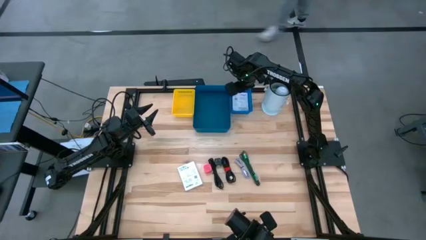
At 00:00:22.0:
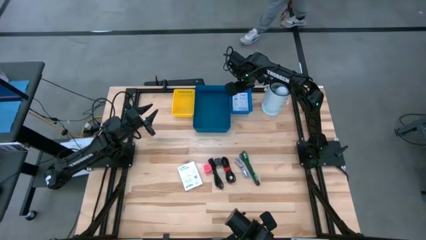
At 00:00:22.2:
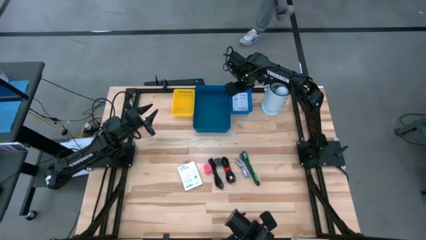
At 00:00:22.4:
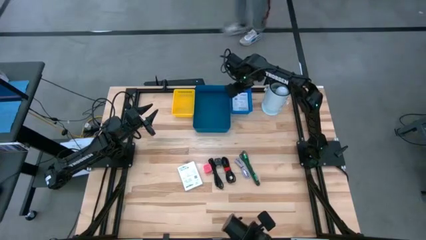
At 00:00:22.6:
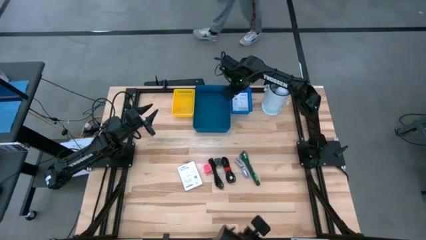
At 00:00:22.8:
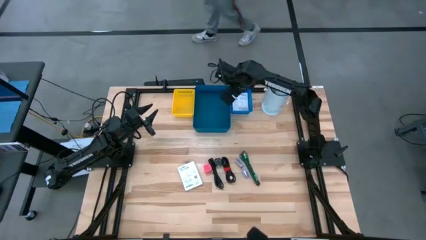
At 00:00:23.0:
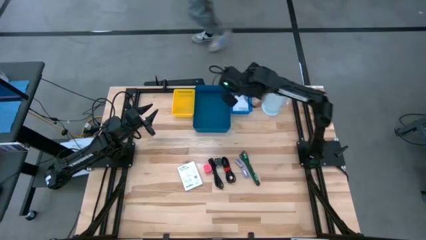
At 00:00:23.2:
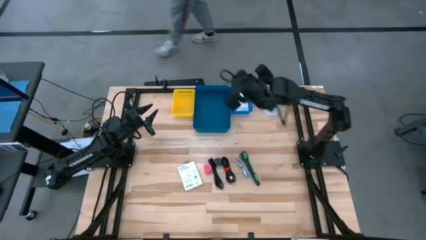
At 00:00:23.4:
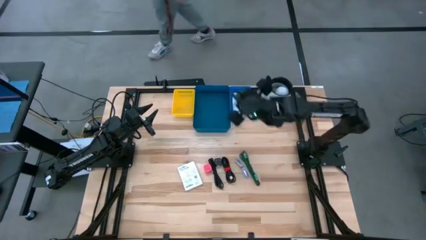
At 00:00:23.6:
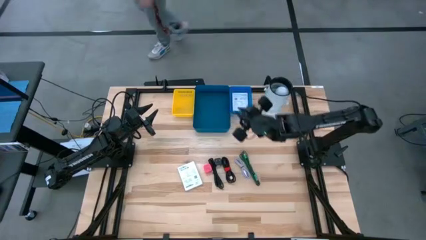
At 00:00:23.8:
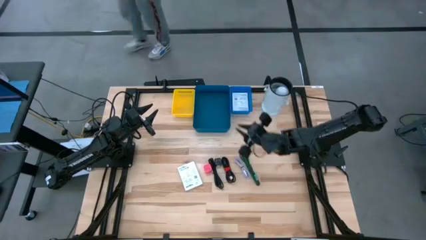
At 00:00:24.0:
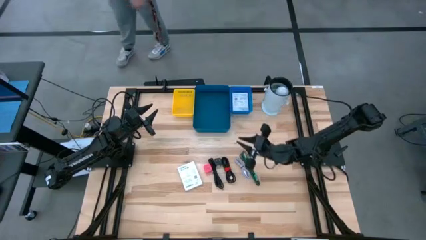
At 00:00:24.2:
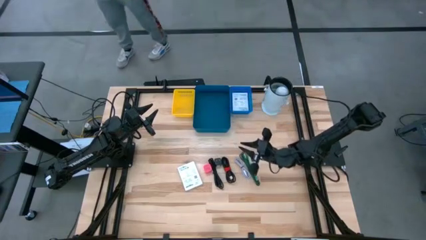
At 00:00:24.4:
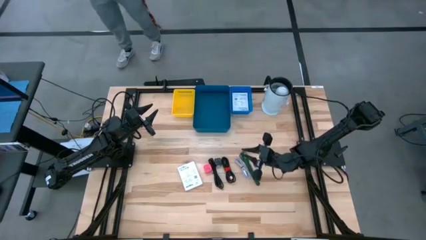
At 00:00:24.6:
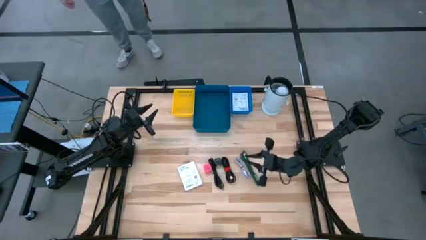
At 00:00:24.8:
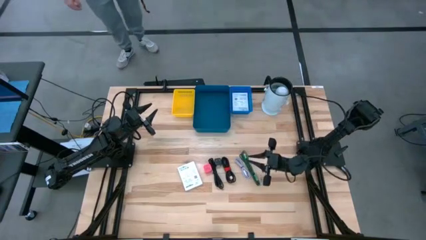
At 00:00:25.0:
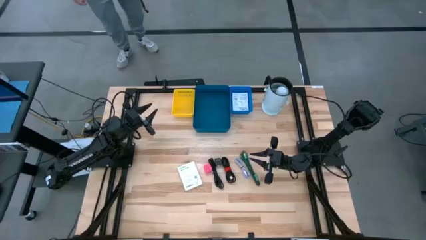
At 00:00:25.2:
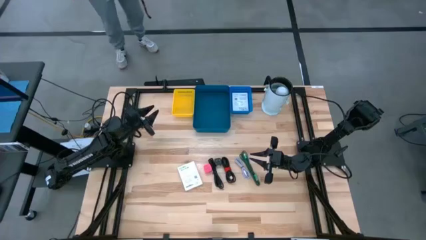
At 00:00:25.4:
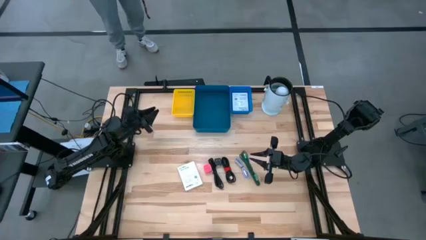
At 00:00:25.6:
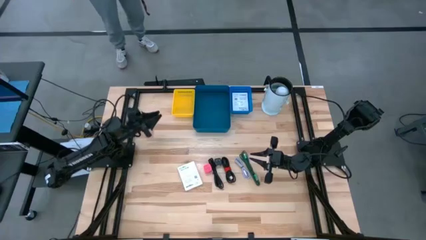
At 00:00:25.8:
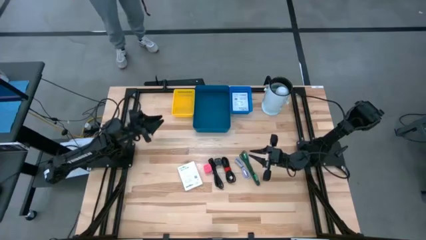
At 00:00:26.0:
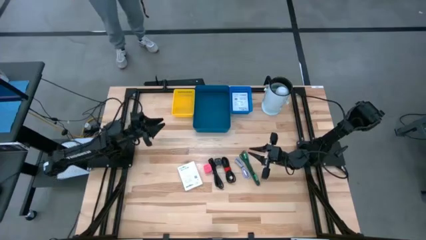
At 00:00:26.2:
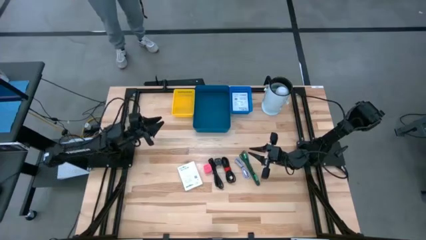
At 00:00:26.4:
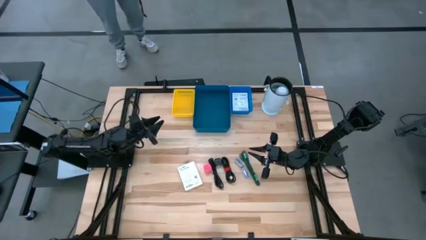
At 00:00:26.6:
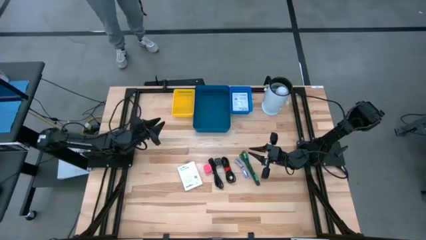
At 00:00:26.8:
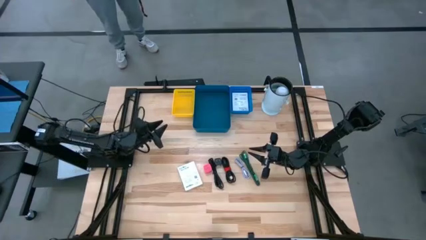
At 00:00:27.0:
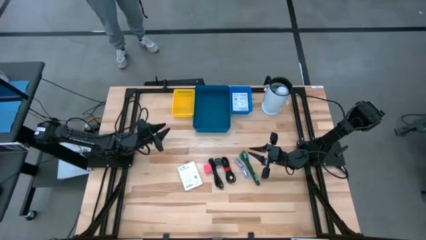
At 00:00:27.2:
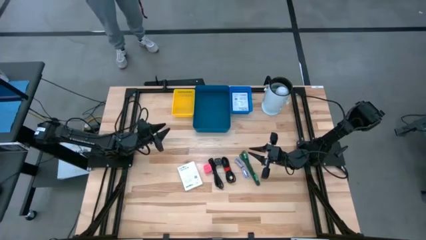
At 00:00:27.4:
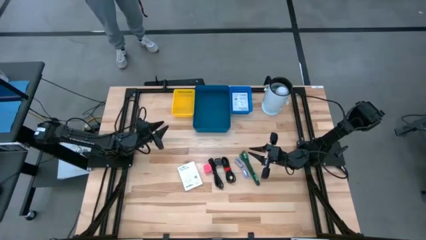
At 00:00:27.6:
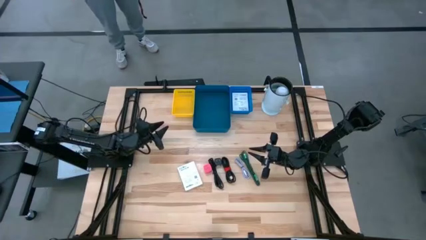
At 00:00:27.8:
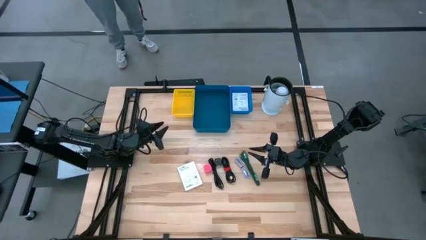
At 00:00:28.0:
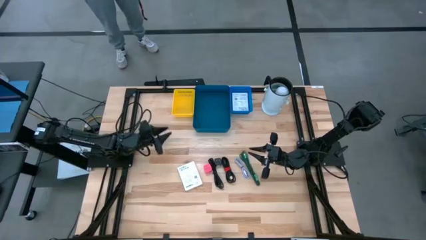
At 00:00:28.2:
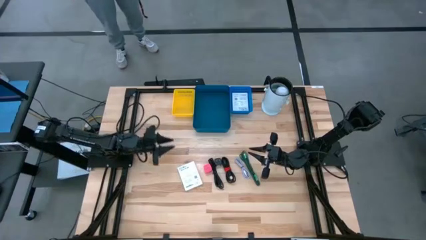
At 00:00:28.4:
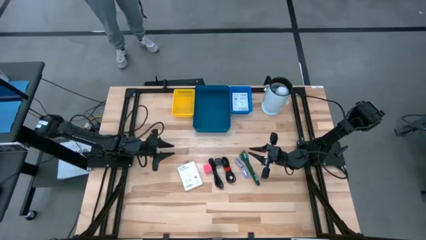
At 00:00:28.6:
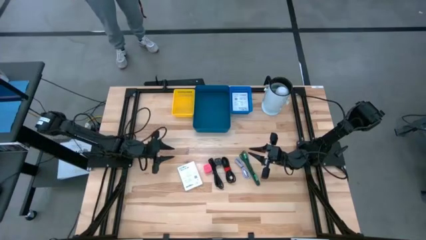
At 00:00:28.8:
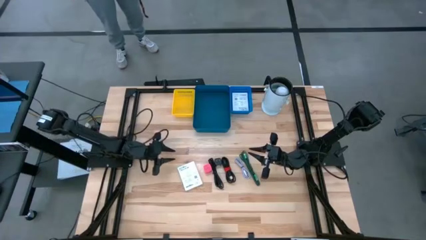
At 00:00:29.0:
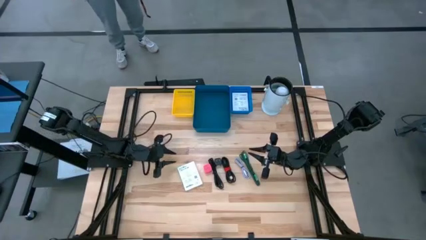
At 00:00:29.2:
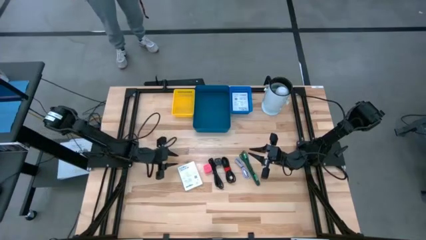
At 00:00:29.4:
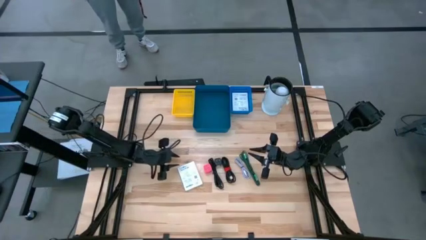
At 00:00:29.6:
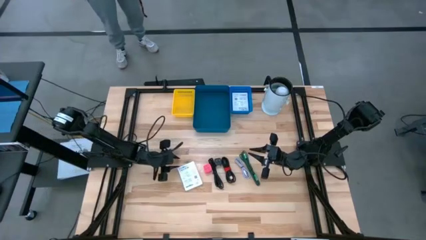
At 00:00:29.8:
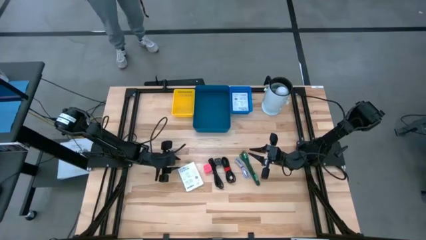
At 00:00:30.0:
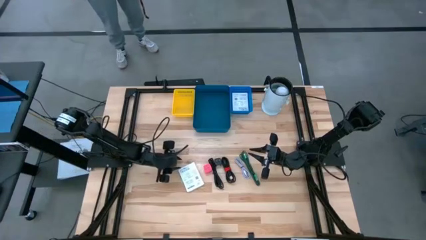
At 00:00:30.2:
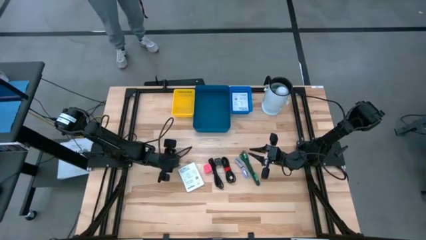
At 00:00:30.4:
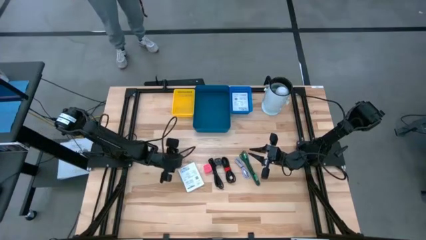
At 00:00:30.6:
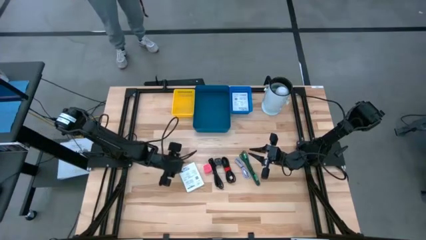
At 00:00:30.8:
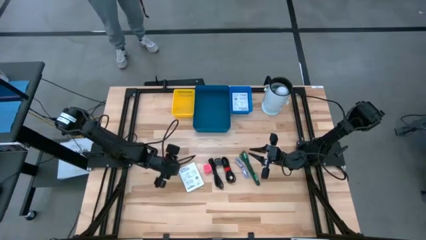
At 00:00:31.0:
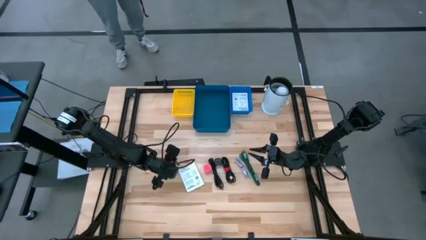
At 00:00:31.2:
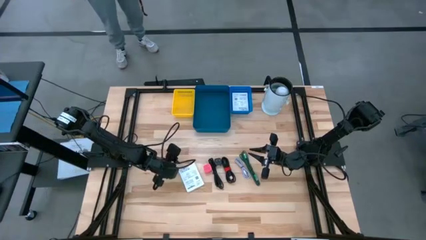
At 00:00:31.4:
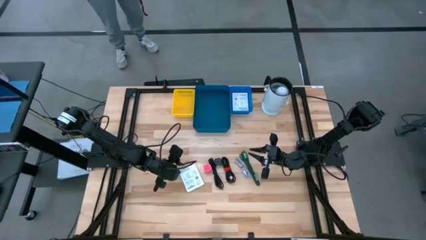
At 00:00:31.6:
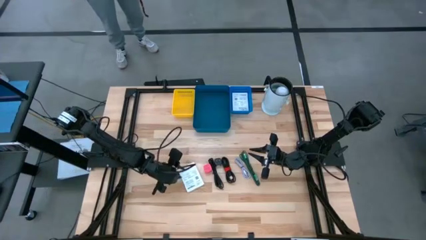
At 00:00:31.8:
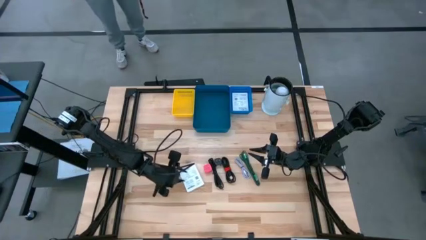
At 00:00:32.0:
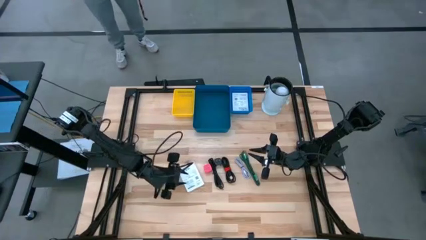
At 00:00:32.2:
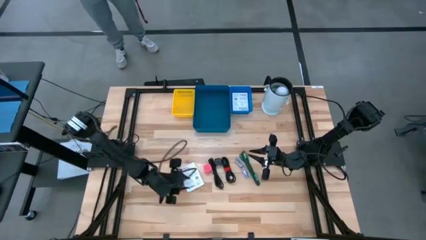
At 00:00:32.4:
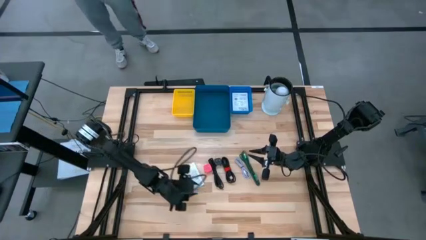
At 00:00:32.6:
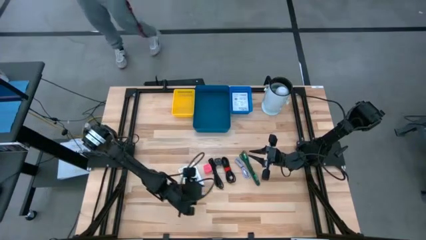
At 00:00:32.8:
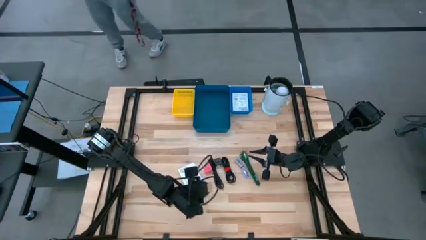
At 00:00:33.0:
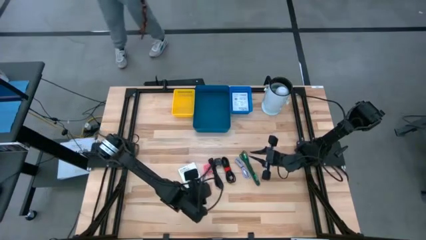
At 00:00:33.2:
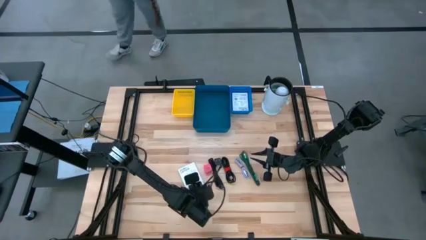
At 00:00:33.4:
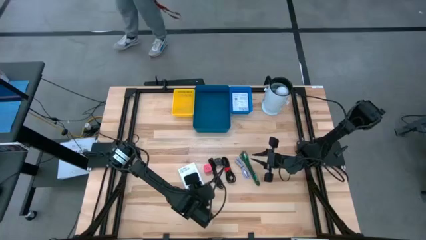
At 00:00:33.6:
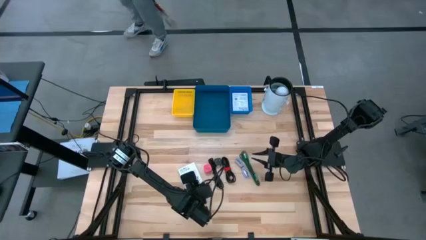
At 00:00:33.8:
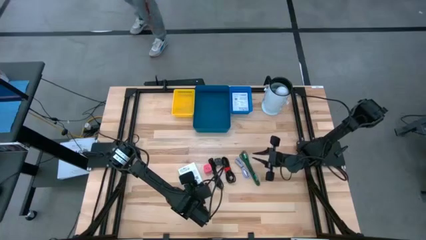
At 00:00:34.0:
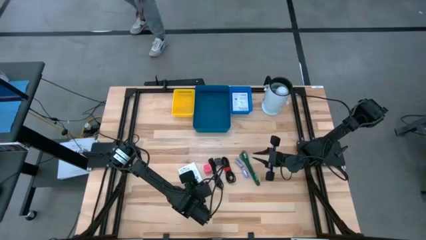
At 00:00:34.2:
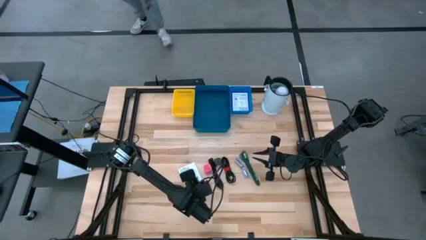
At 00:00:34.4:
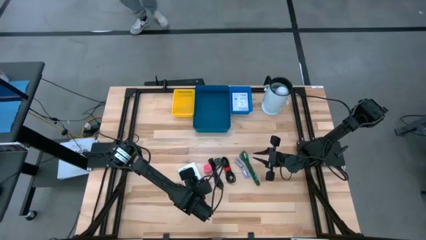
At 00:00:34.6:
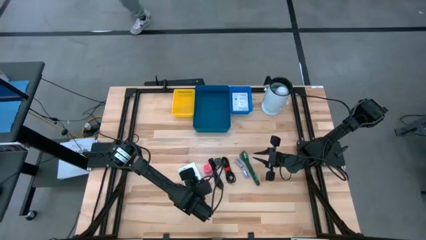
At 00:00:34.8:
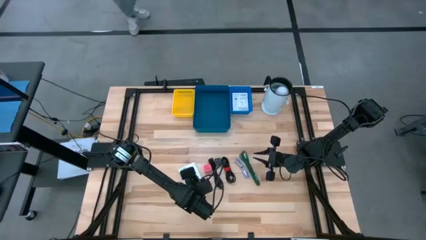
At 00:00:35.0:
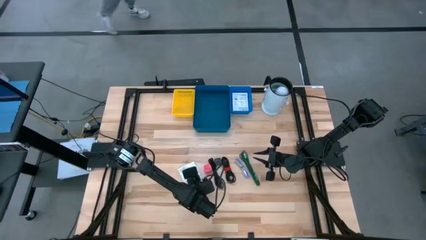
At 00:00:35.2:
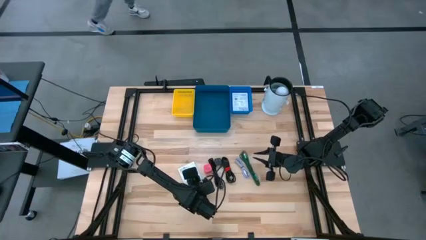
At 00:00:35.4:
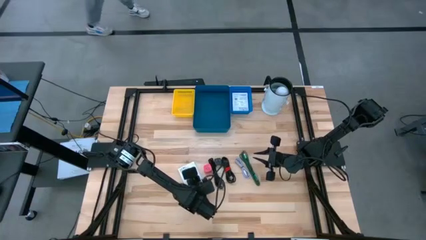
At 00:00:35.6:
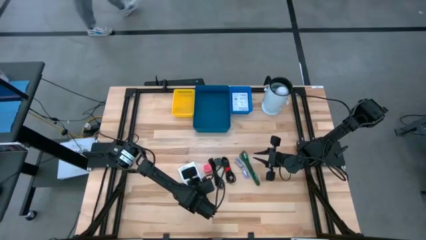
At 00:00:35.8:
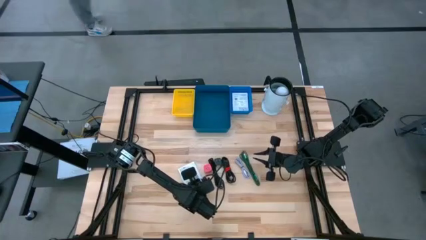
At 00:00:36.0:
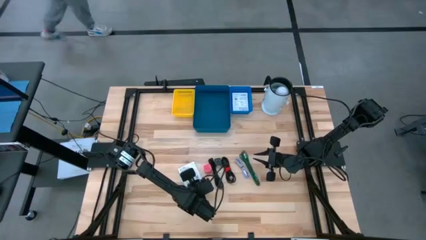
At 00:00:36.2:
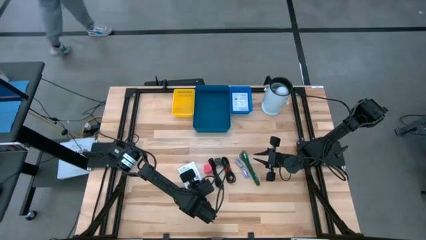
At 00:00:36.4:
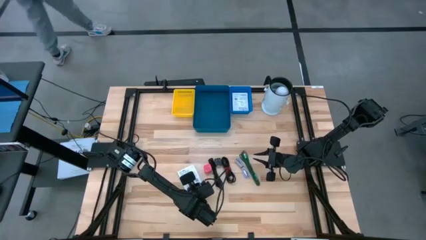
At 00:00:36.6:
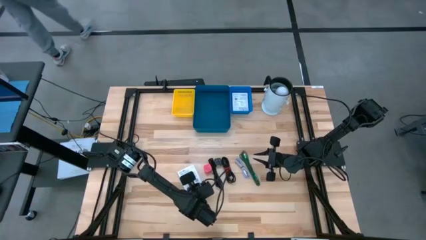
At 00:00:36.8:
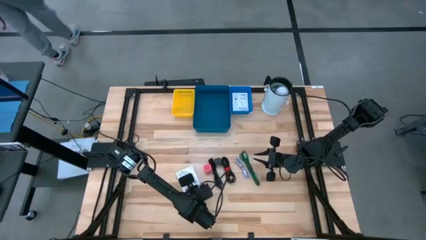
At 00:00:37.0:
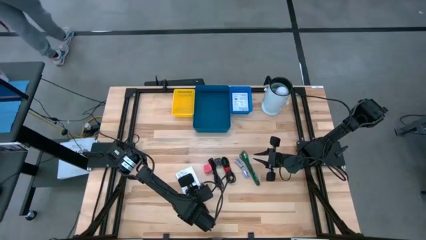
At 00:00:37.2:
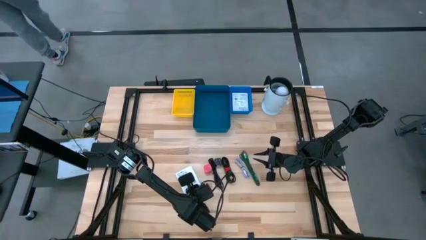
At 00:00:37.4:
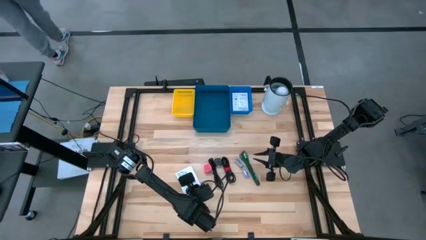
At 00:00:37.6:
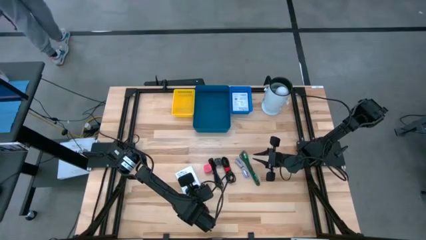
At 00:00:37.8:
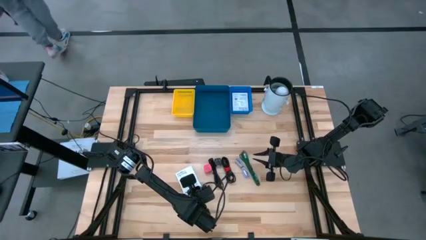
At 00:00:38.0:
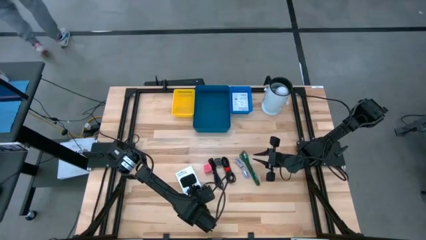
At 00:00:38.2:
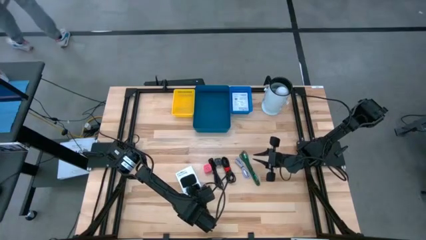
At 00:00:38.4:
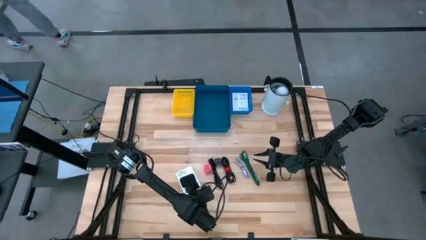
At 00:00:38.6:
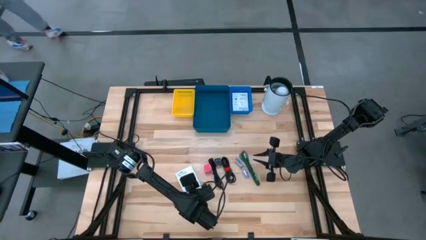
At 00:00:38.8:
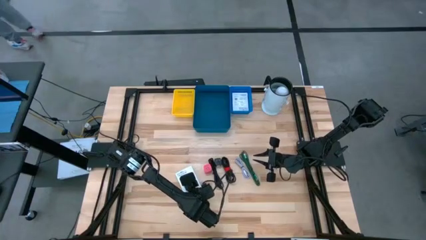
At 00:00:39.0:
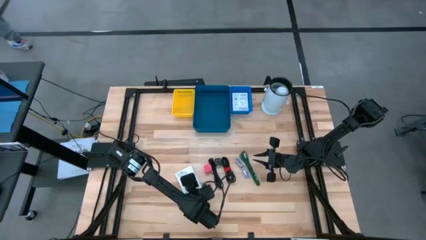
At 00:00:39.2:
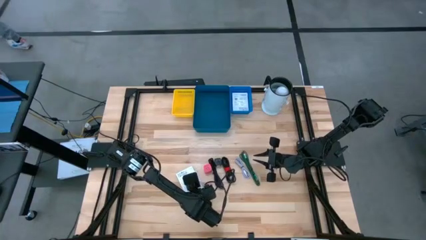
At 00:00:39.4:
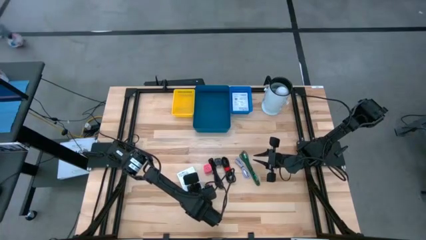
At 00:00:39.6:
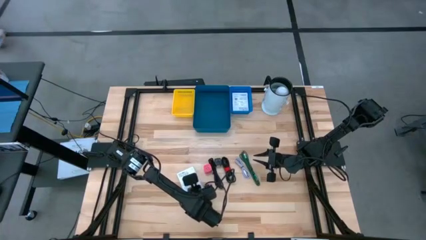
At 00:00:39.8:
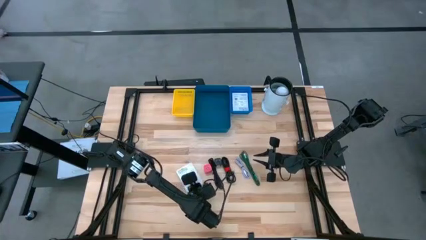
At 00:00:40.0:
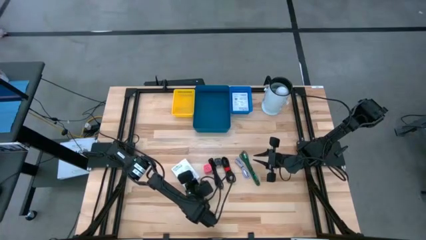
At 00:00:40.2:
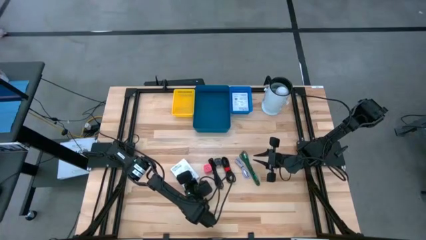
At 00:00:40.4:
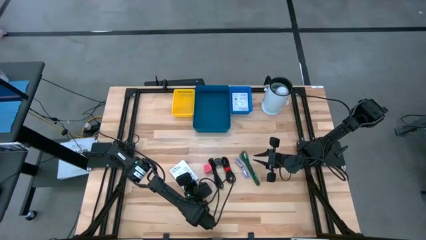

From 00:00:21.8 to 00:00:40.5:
Task: Pick and place items into bin
Put the white card reader box into the blue bin
